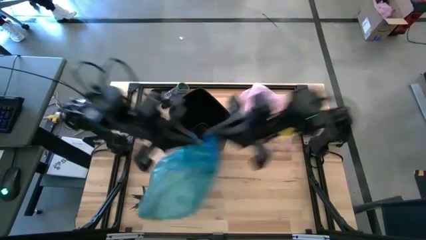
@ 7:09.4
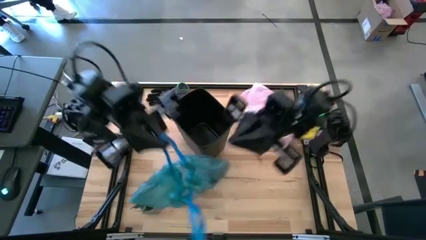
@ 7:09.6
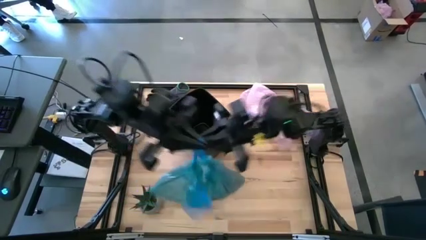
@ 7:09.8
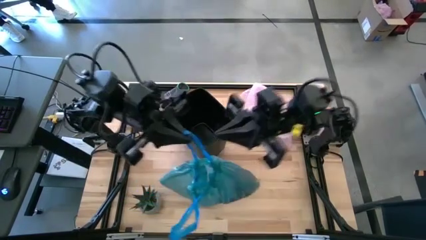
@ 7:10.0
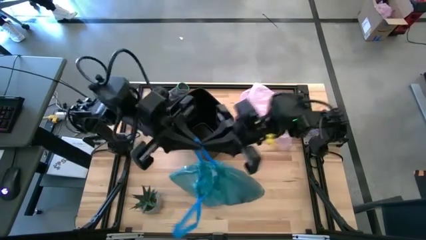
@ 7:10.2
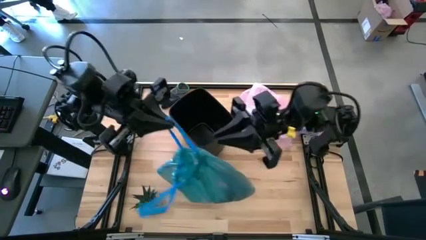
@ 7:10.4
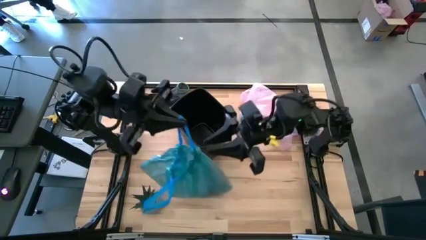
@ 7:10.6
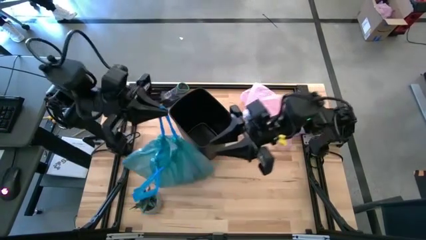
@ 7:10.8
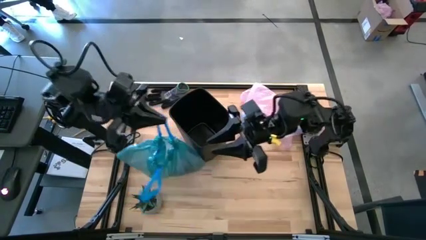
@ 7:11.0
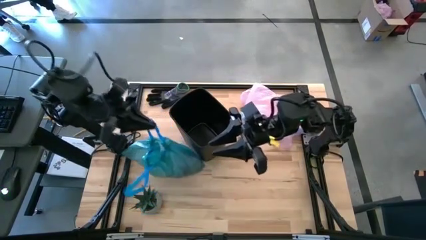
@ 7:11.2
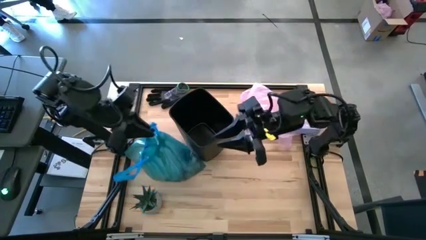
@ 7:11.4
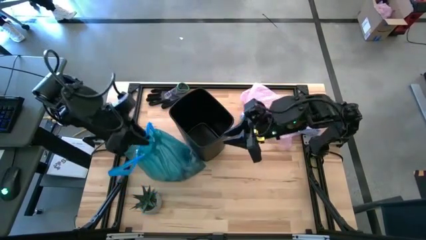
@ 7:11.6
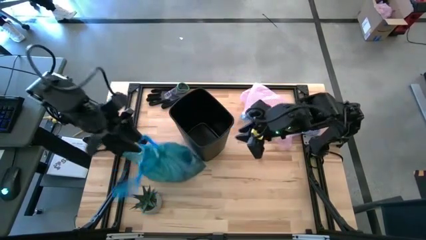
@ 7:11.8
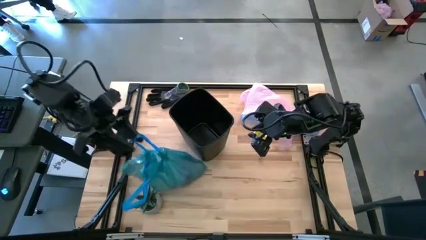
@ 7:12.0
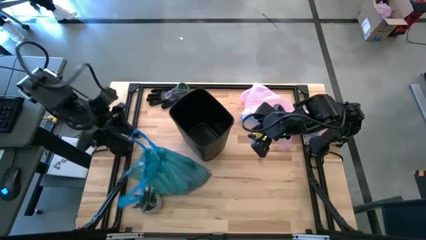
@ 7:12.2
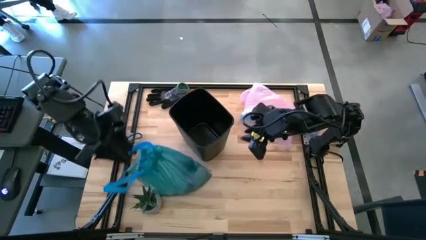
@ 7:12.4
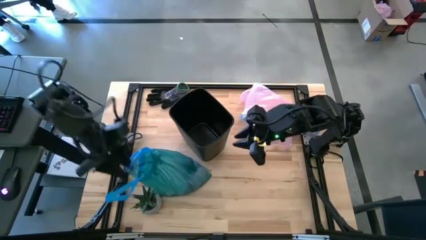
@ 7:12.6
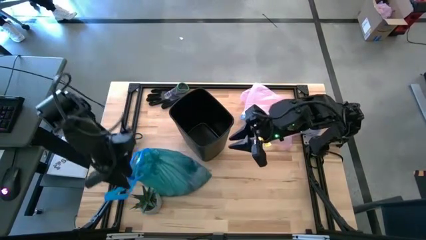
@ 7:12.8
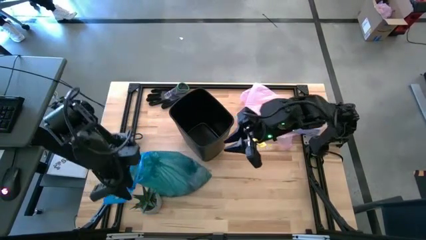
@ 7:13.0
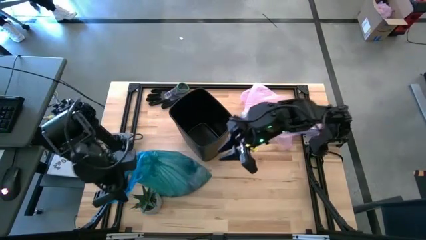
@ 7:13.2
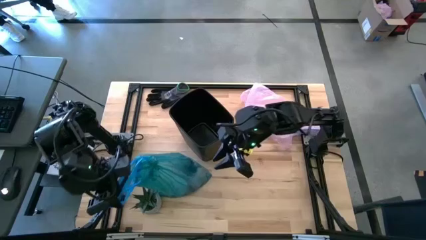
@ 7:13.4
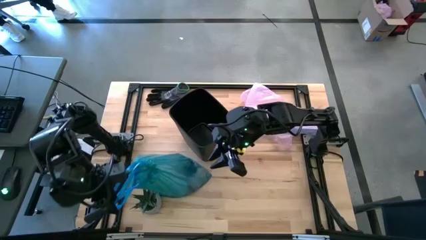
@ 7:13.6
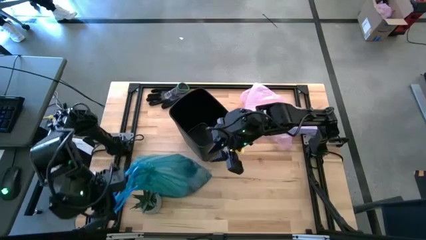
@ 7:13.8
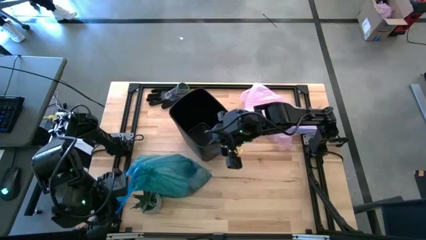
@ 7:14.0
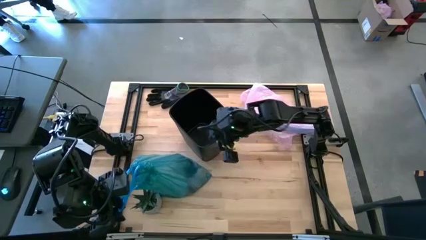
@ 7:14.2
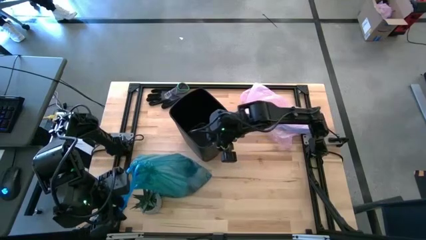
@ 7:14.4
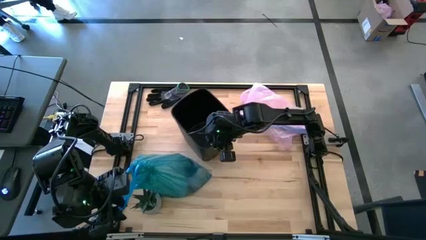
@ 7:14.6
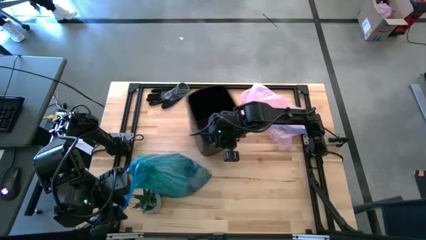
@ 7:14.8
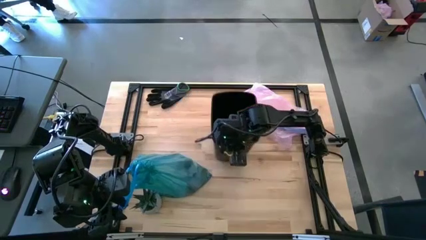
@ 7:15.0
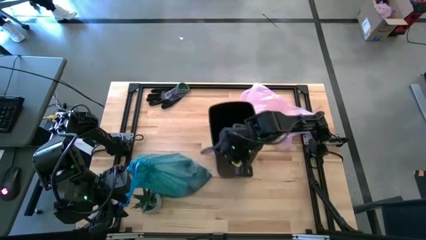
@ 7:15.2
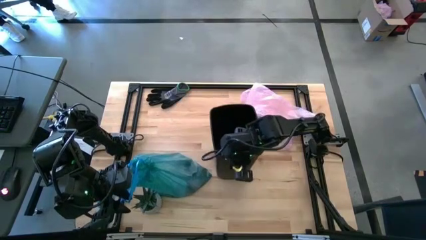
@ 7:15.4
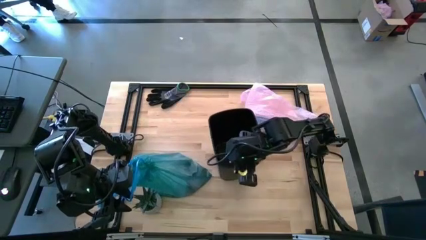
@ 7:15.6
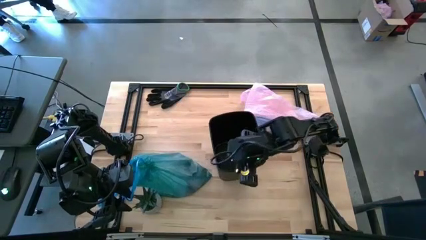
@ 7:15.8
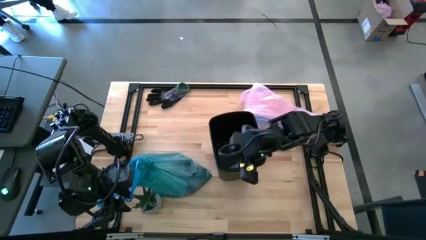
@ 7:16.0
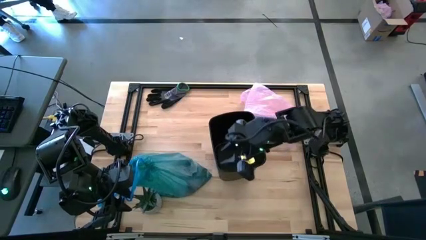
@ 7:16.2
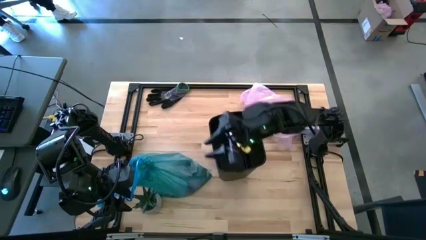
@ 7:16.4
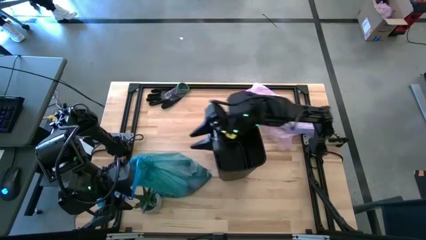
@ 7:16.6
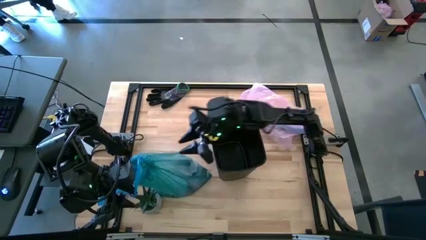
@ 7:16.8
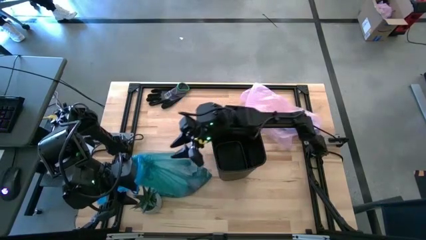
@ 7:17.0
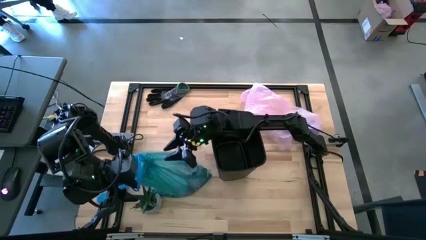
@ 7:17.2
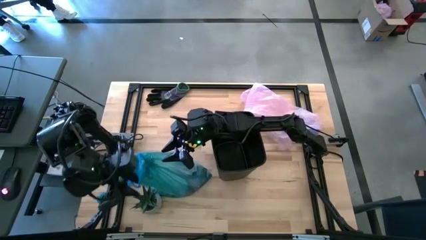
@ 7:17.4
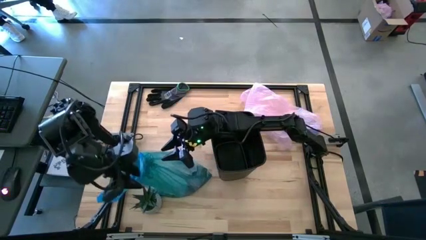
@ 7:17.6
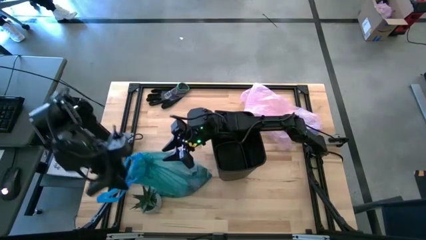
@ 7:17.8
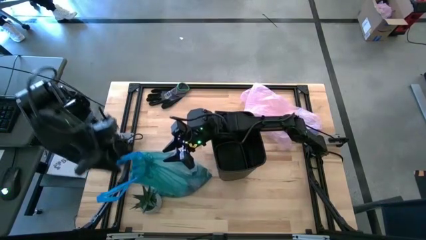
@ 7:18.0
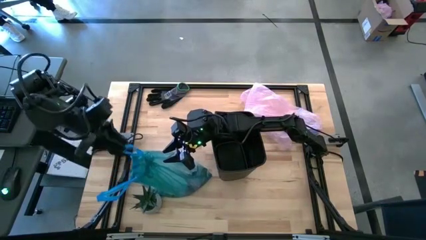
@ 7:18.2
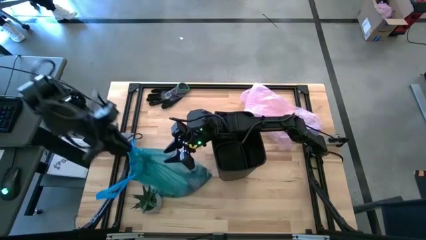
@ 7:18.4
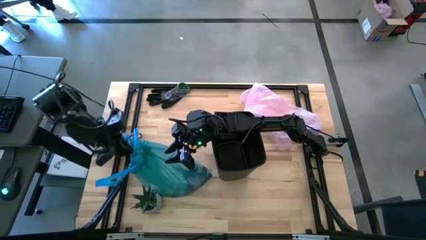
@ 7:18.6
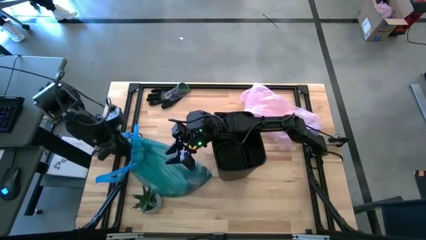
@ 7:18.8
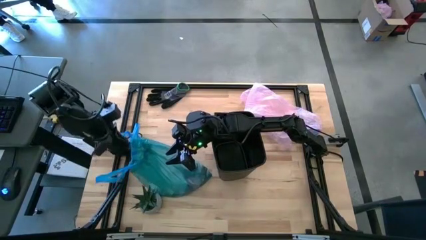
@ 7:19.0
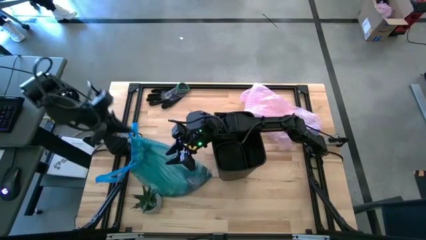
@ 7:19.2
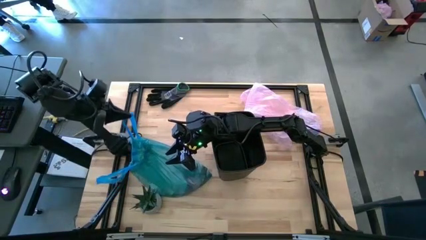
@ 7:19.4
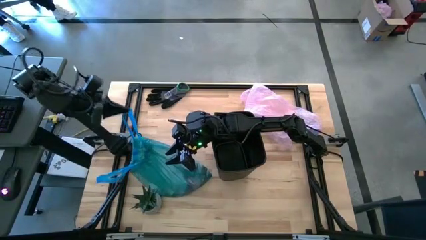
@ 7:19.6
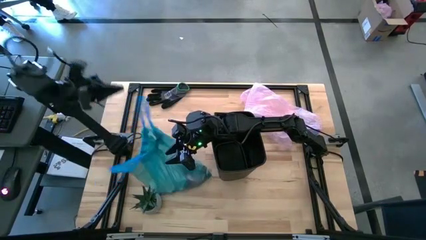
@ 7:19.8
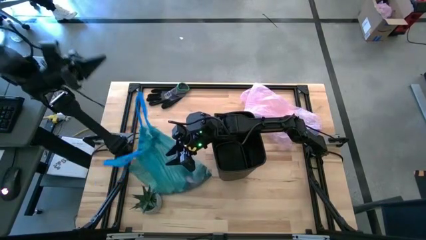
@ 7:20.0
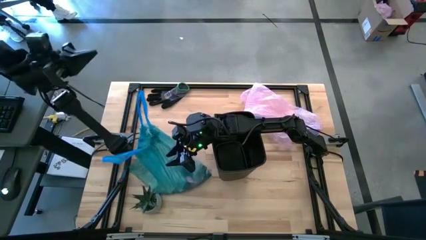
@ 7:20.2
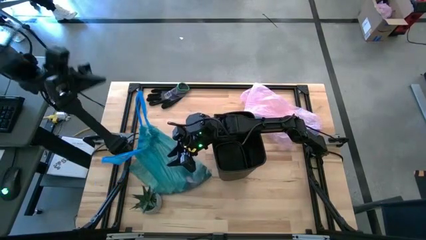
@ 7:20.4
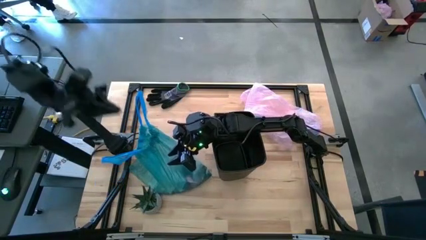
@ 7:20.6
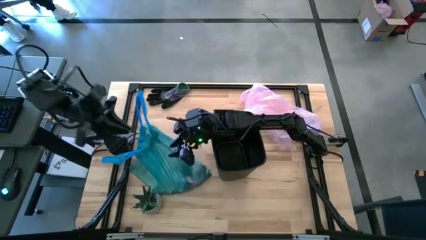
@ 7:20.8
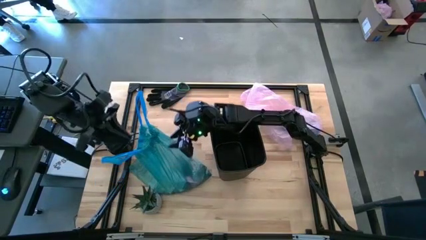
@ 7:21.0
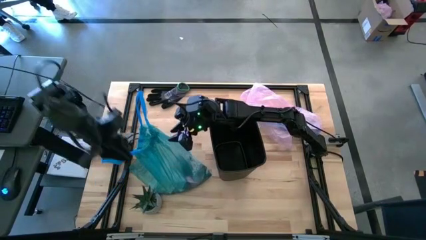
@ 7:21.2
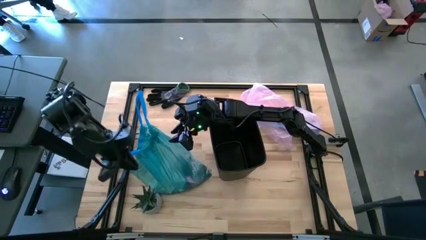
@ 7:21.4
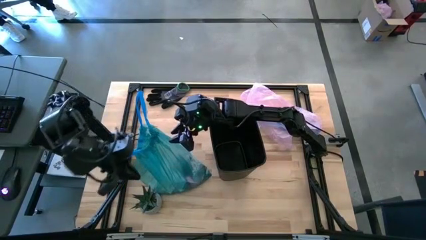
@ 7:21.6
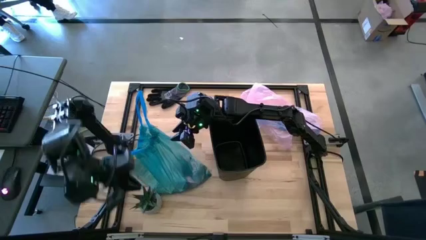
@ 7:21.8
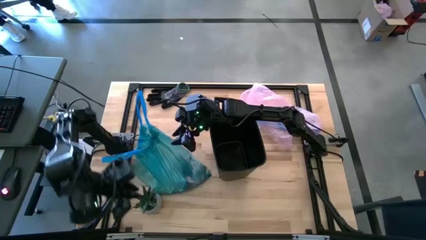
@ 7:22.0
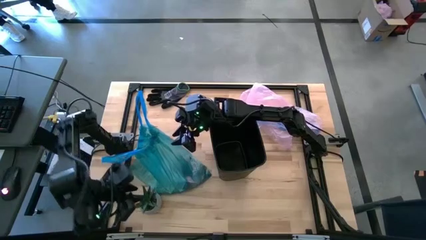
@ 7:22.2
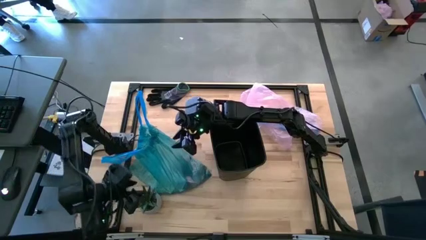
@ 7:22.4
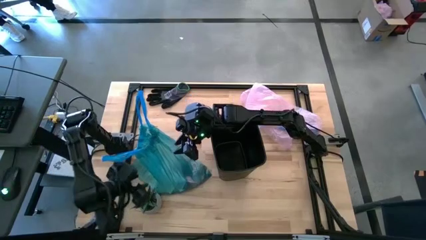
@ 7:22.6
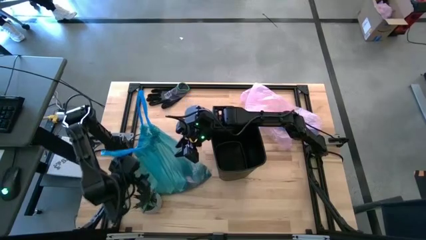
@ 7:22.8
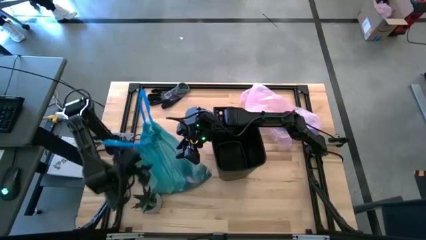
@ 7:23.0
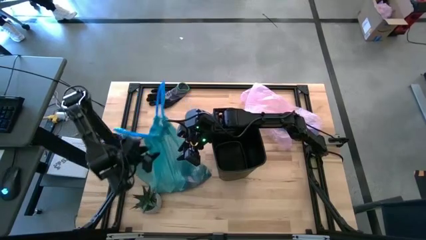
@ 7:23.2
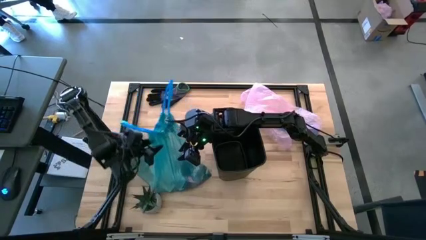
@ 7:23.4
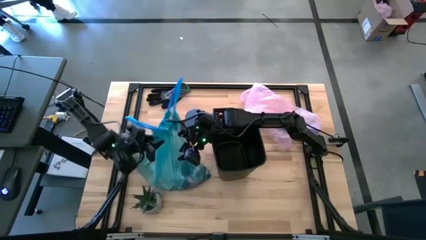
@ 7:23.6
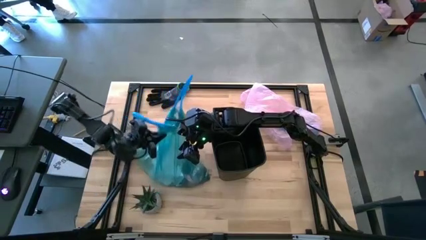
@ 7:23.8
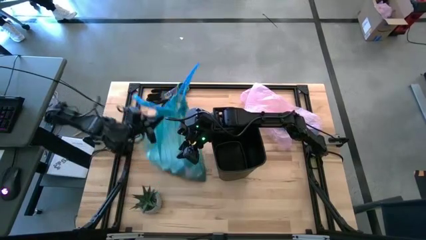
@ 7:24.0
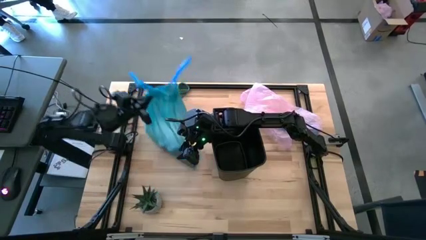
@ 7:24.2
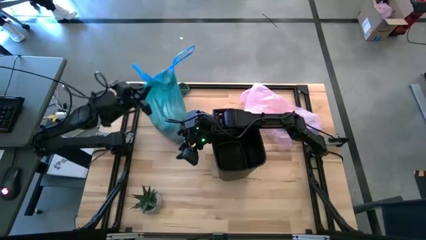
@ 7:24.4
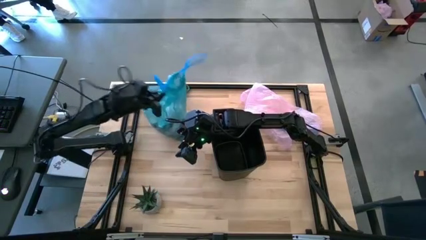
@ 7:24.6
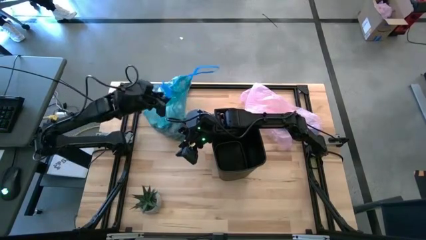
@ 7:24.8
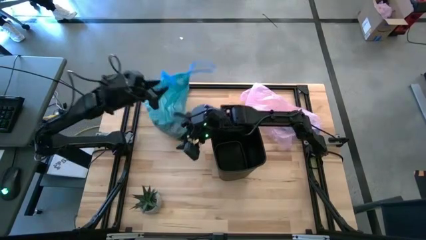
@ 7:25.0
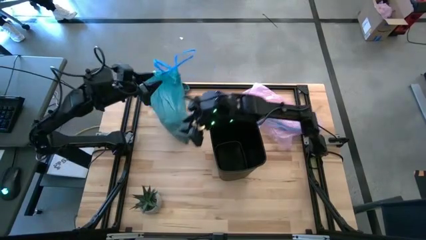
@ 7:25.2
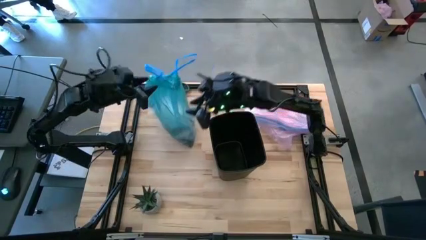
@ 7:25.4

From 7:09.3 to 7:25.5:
Task: place trash/remove bag and relplace
Close the blue trash bag
